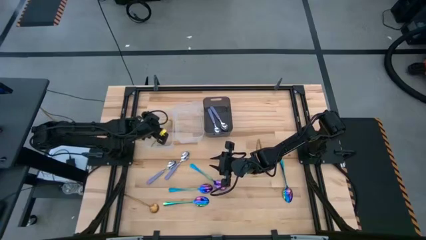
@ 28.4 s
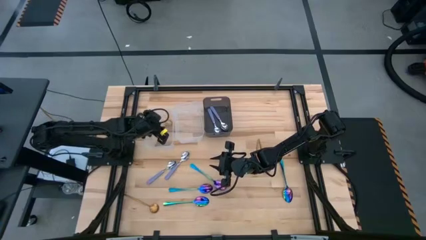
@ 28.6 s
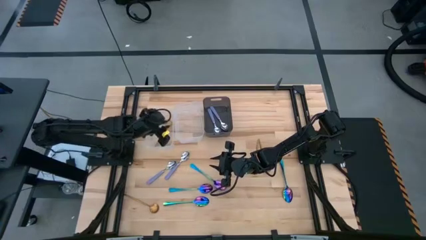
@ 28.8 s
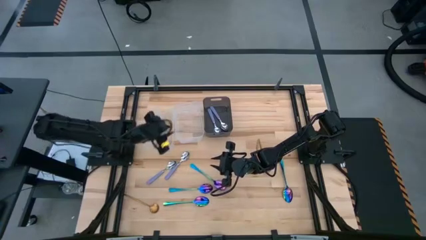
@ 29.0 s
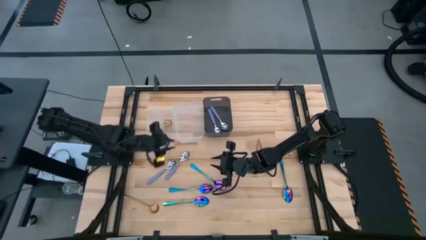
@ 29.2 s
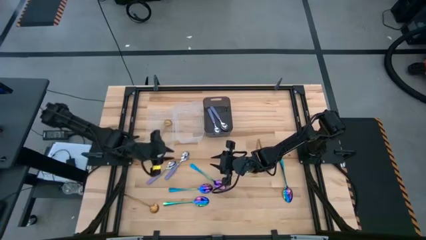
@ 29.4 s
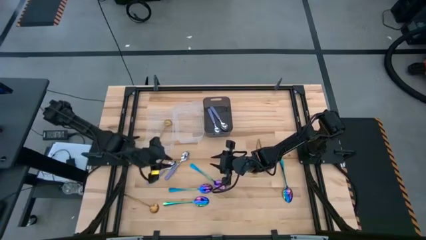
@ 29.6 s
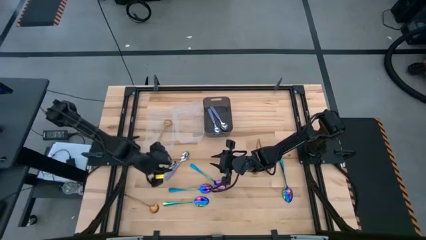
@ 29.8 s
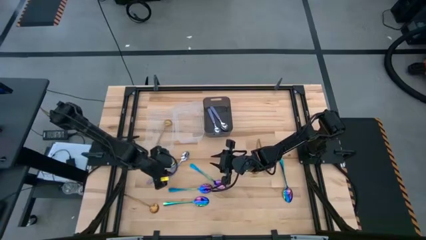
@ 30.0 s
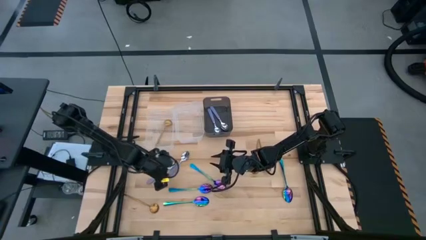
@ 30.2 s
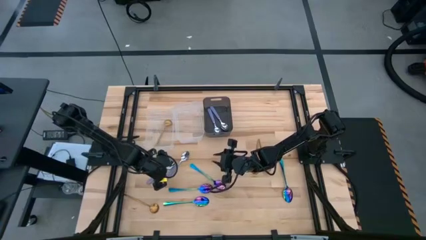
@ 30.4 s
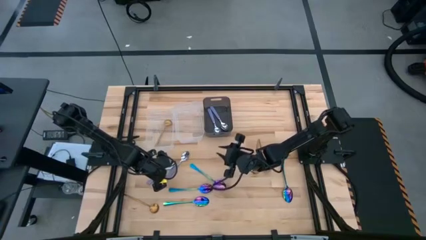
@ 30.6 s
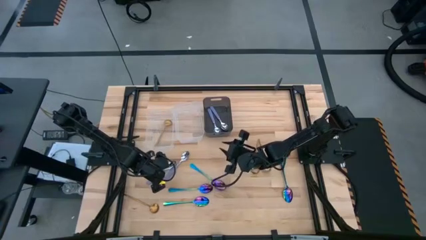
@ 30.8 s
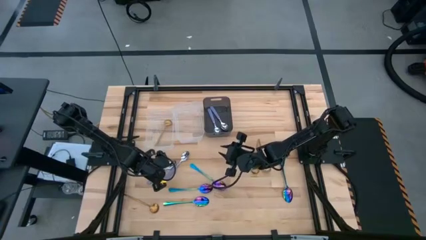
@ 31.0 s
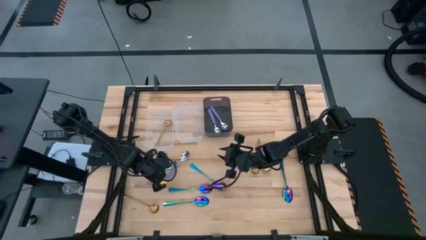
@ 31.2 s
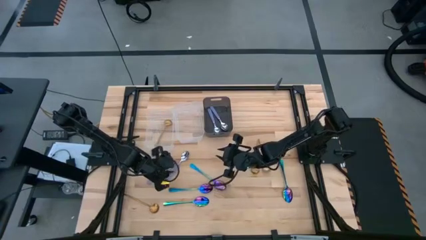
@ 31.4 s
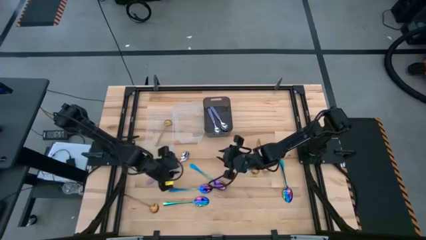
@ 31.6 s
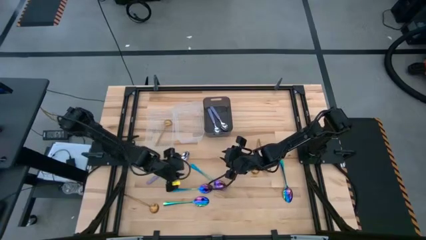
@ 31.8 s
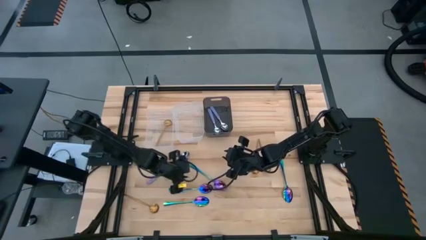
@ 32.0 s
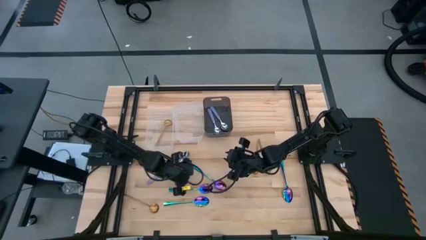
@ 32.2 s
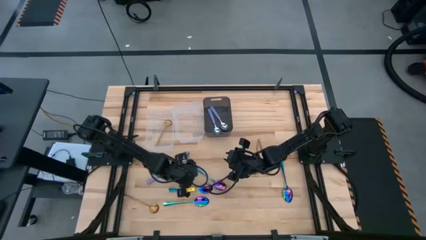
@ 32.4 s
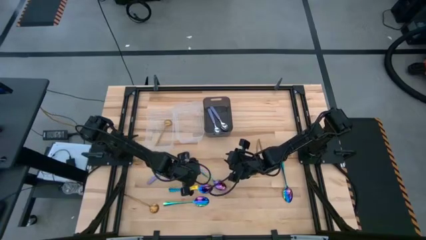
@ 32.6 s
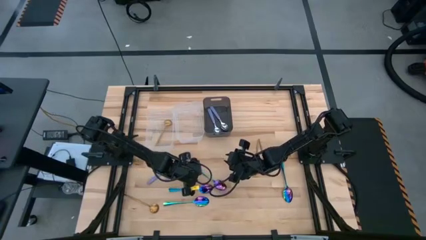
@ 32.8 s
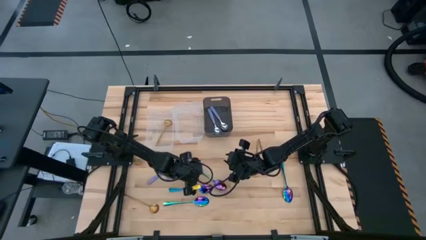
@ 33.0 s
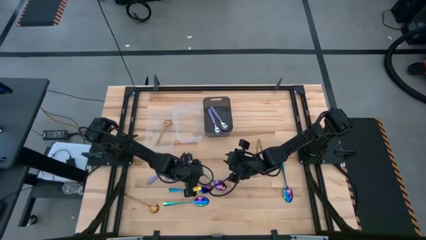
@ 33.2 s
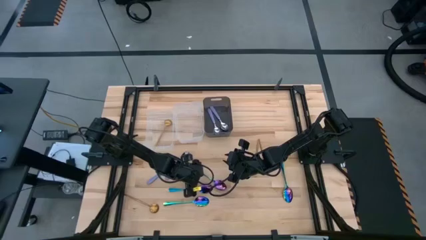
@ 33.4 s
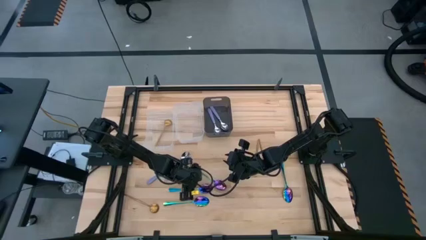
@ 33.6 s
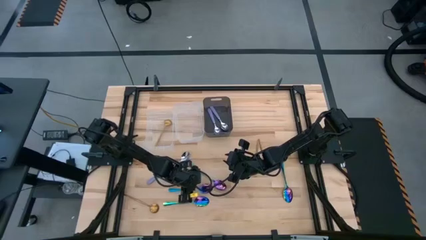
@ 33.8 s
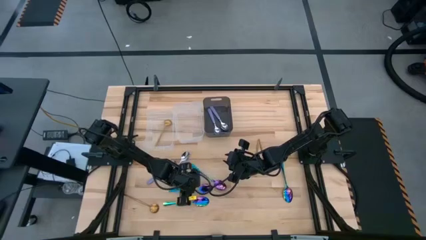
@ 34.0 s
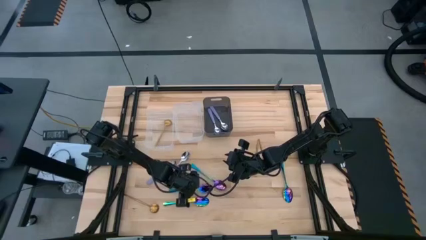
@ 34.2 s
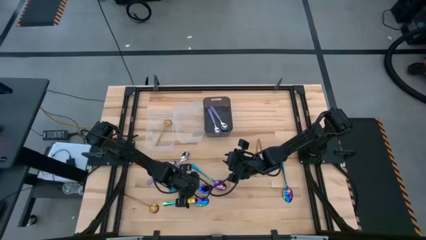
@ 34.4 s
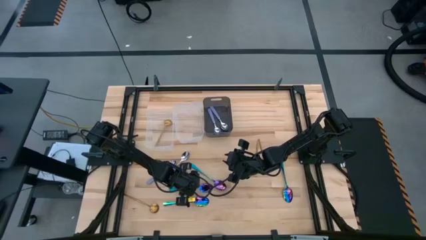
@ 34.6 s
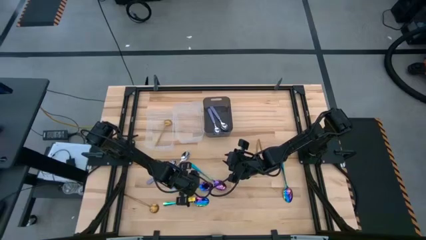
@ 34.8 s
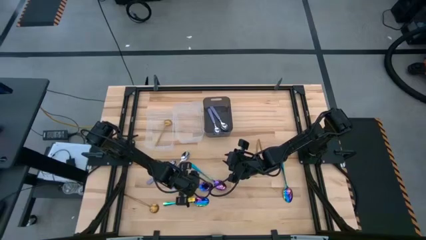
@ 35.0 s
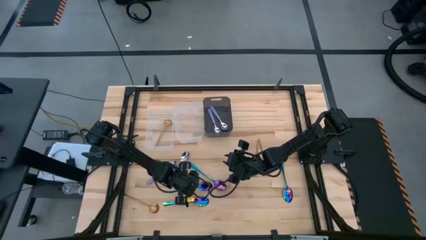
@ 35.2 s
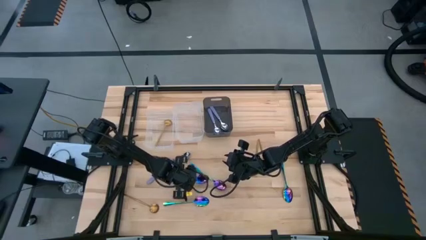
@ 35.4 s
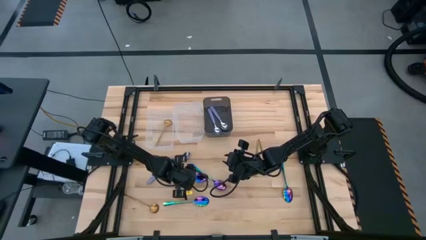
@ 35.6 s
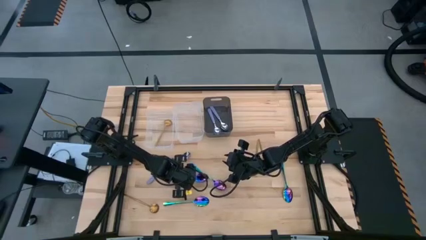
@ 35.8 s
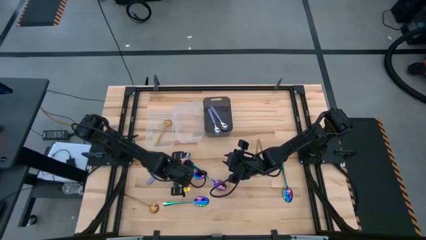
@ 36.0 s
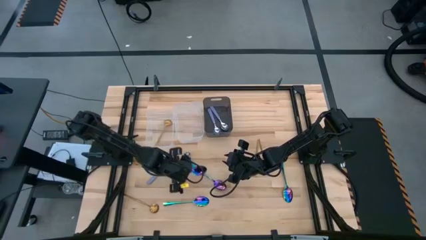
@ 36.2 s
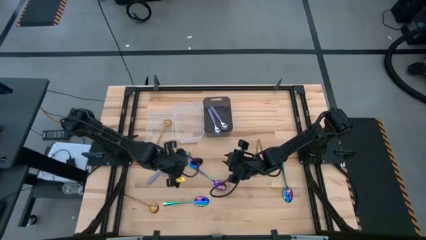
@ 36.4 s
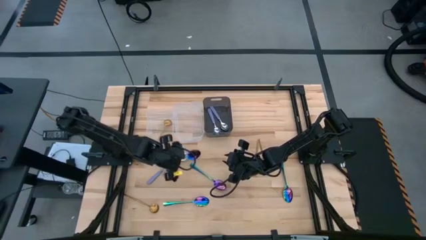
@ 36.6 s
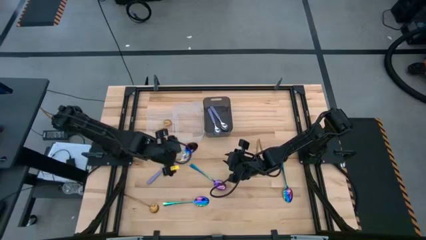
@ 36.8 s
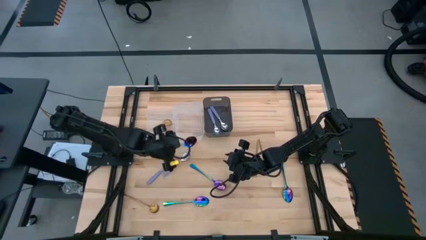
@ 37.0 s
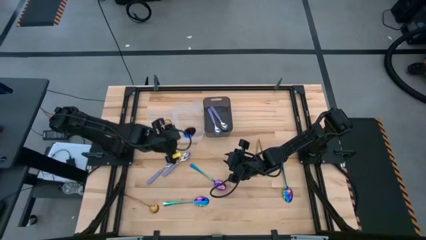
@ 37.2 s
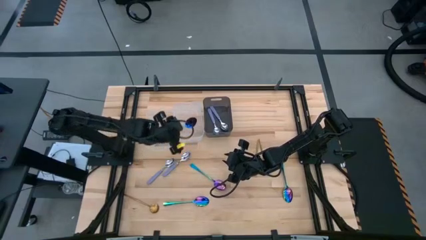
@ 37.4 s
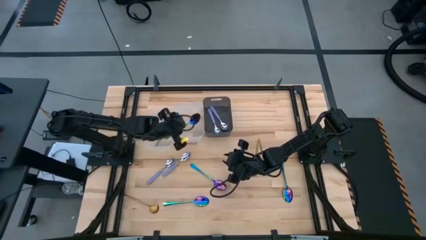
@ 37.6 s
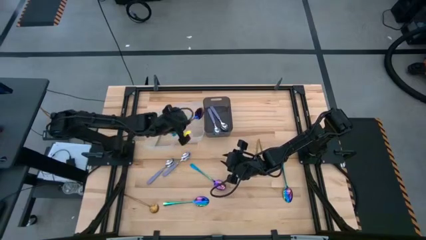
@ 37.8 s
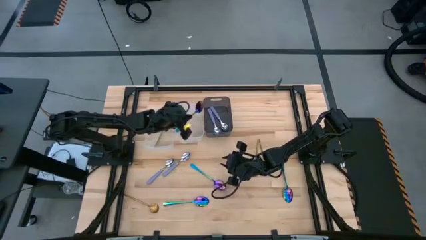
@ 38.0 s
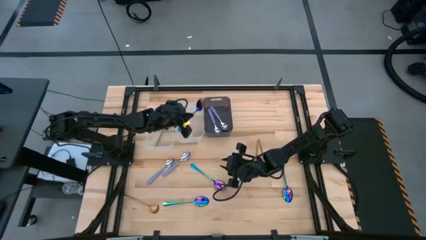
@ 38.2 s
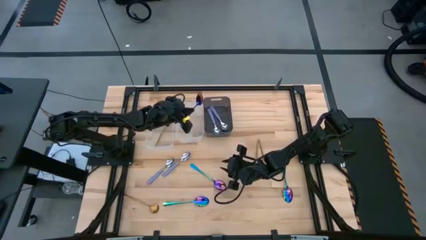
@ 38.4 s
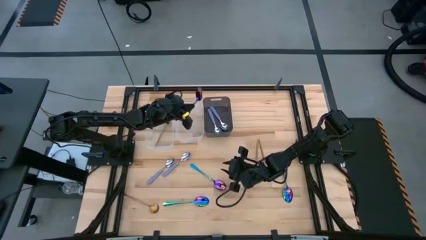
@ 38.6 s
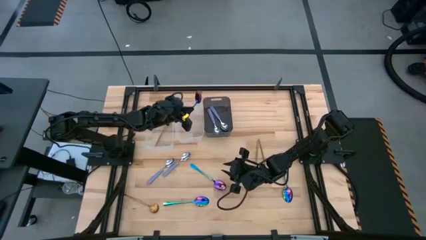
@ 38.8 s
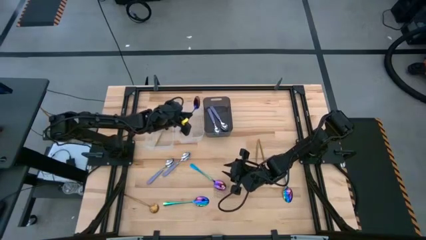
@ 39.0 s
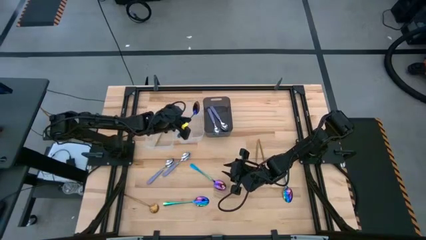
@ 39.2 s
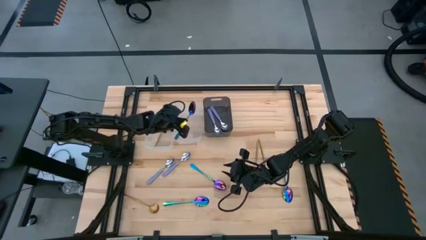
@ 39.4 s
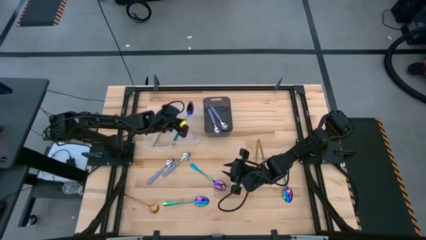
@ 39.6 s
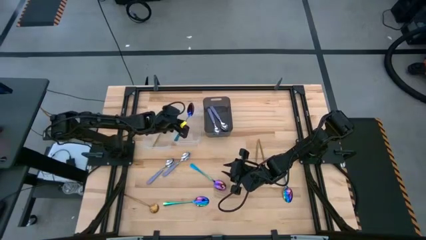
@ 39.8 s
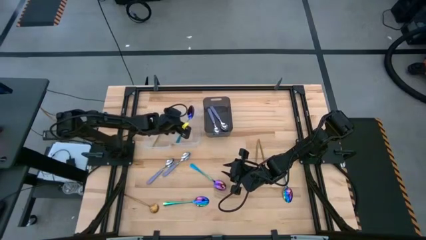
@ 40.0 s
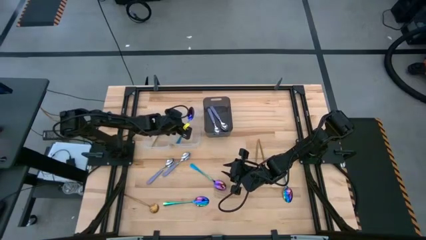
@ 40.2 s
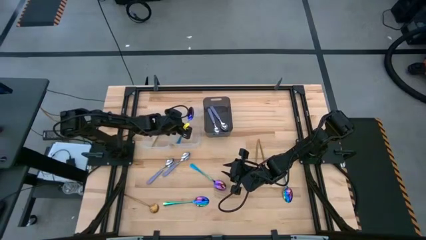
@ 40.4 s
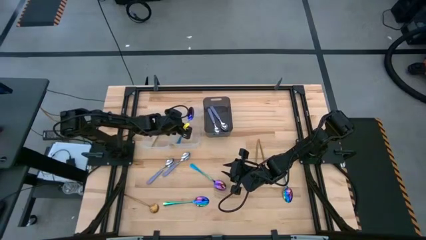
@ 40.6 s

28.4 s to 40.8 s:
Task: Sort silverware by color (type)
Put the blue spoon into the right transparent bin

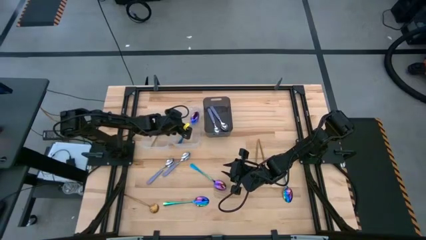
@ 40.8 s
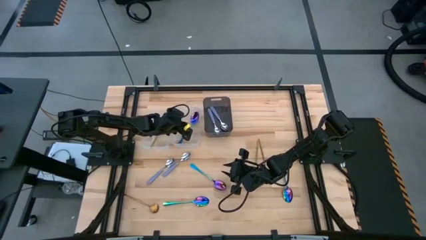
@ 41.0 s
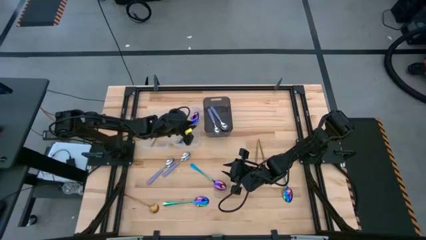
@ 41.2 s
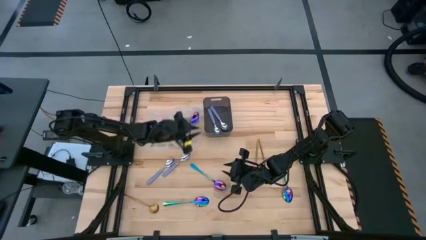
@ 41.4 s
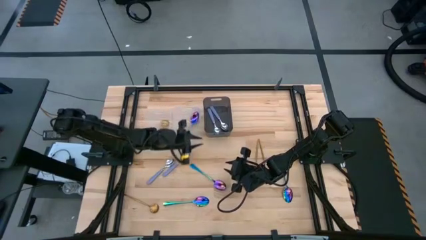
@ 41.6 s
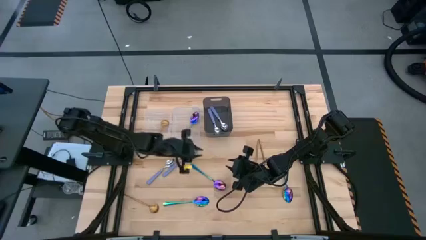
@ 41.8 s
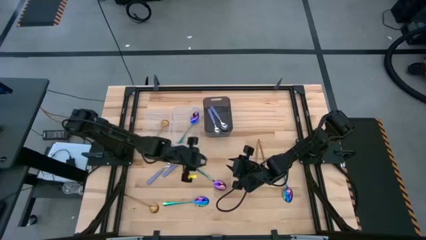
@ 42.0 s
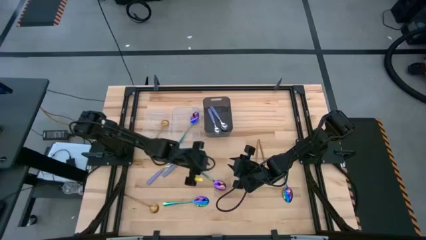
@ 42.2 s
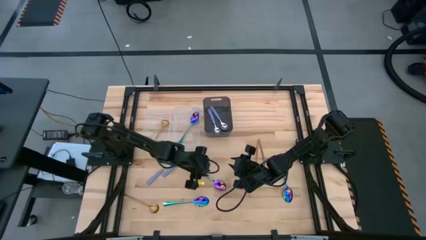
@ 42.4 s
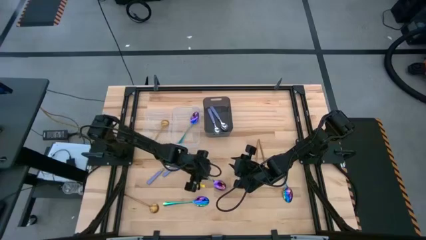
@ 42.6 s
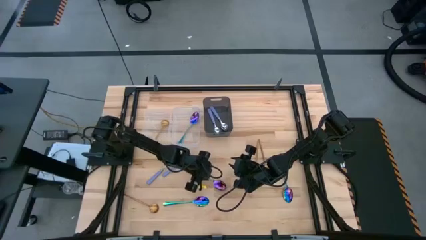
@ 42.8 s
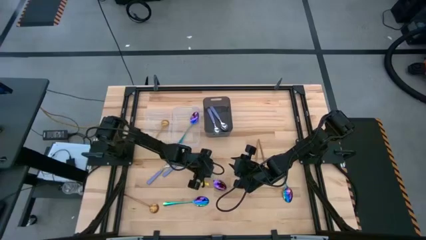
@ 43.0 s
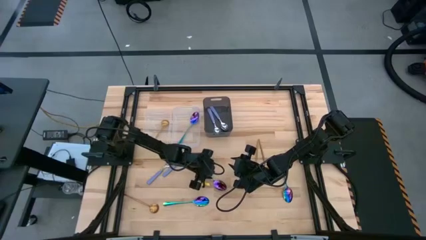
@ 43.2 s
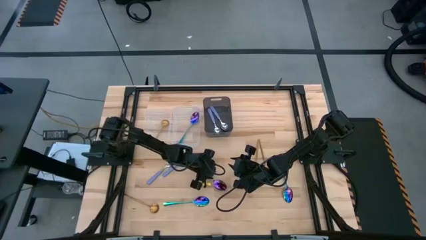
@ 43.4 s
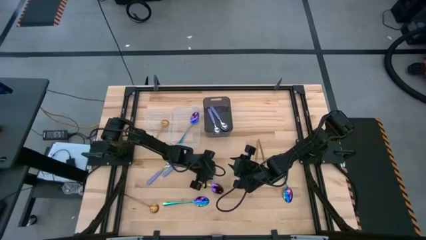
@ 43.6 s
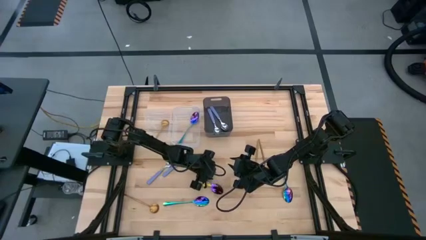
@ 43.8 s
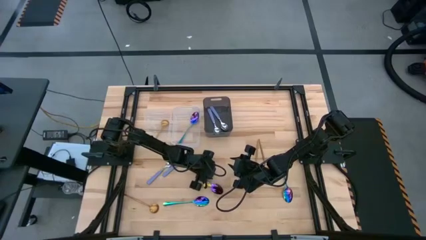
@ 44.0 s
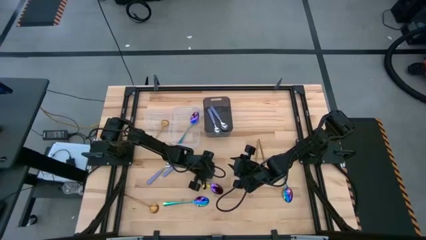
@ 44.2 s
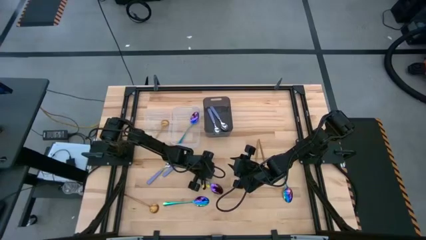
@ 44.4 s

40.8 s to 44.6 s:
Put the blue spoon into the transparent bin

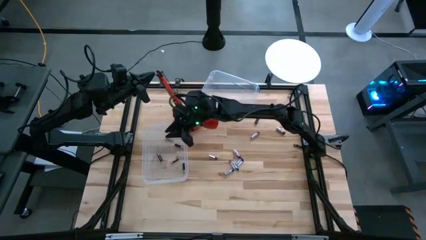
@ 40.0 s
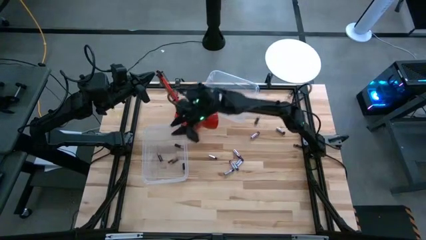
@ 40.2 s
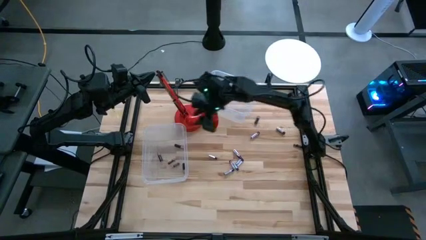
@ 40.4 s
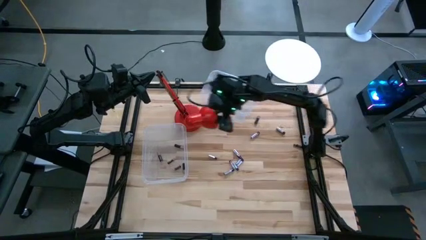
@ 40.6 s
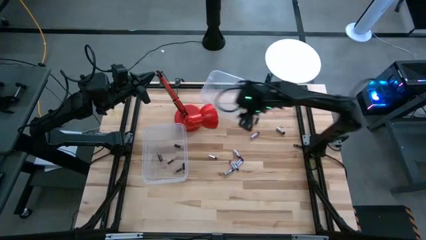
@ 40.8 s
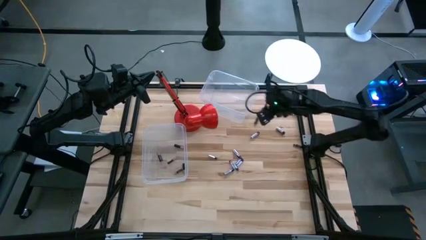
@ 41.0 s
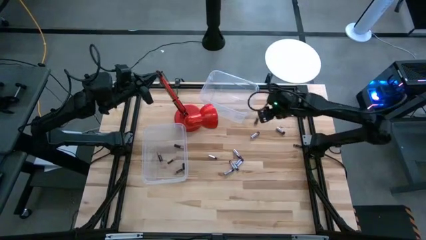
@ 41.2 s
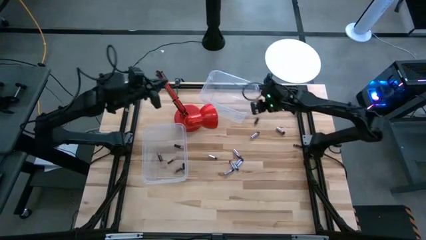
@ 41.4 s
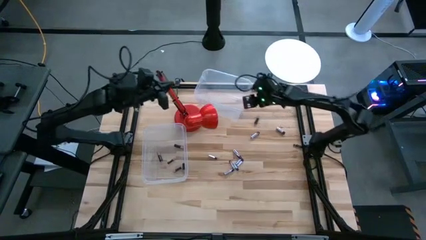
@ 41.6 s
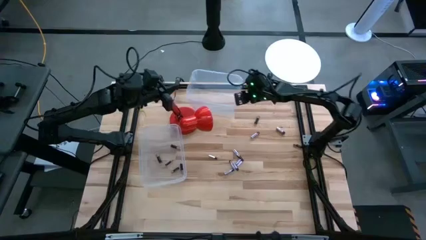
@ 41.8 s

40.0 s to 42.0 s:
Task: Sort batteries
Adjust the top transparent bin
